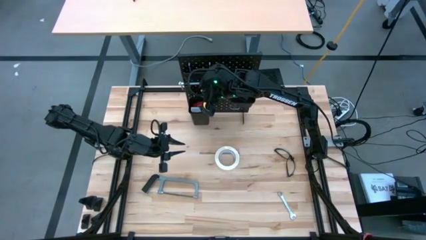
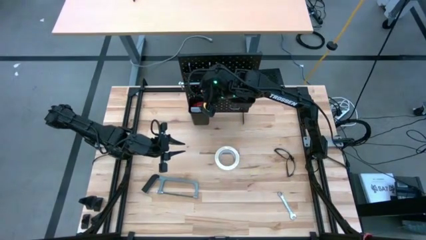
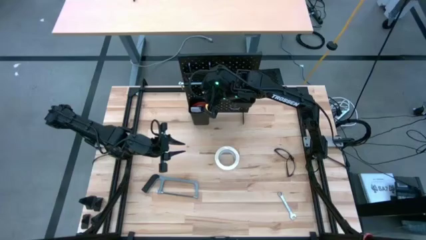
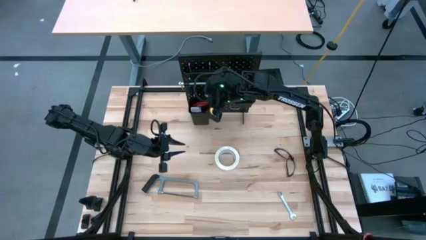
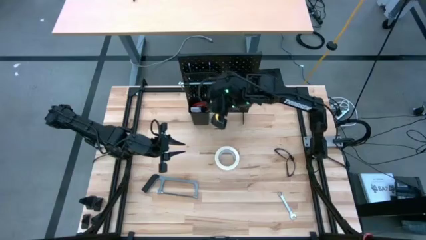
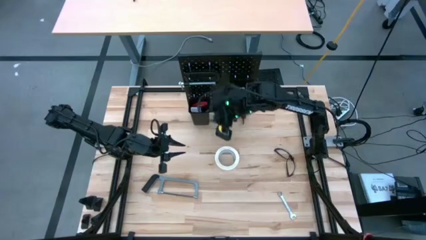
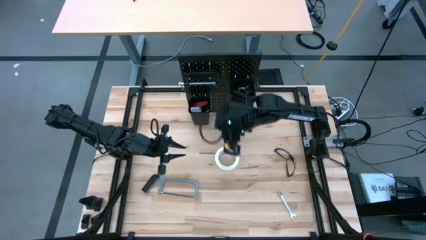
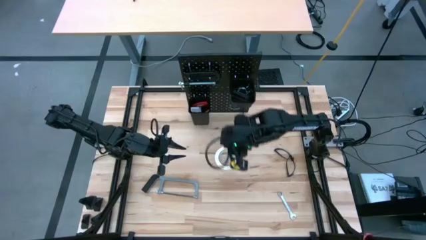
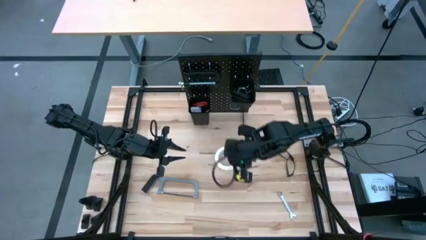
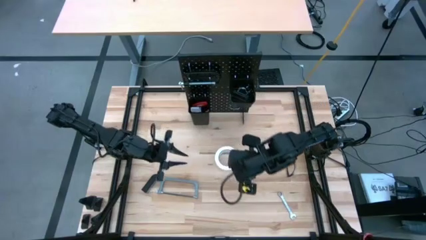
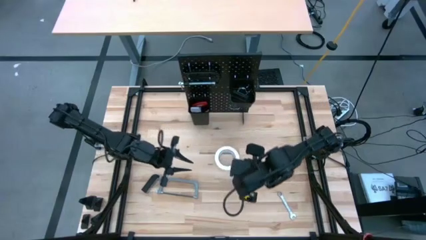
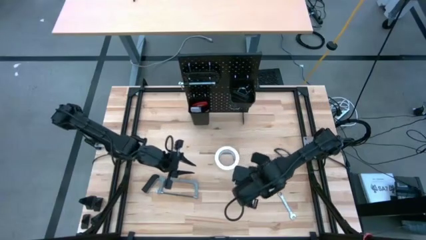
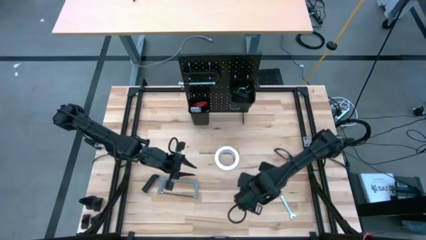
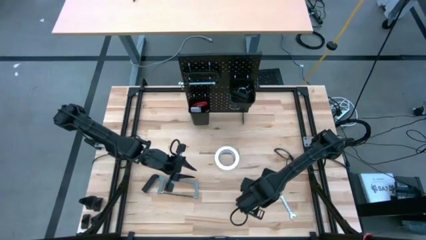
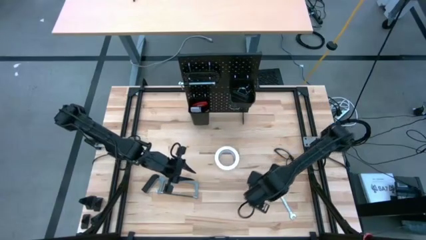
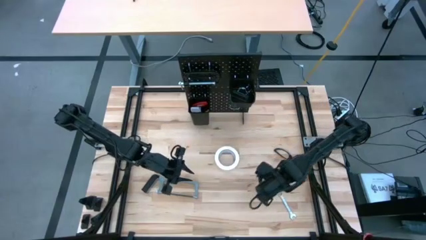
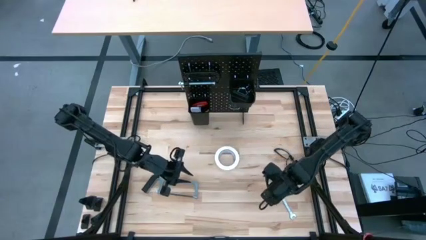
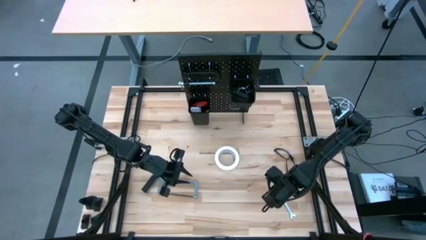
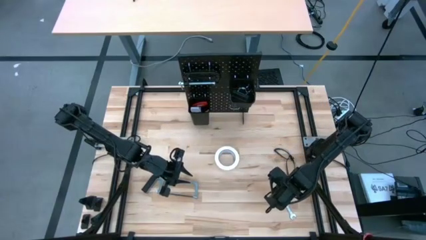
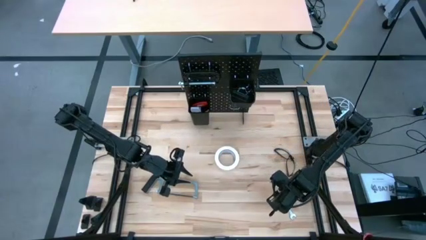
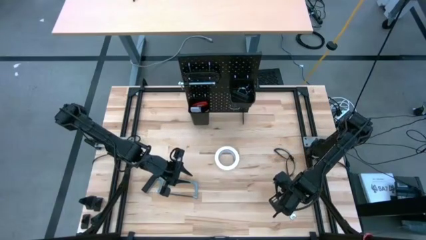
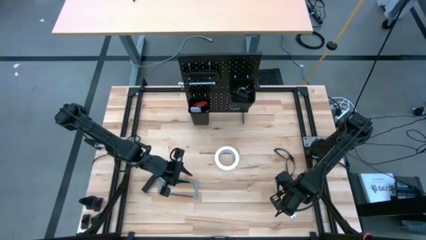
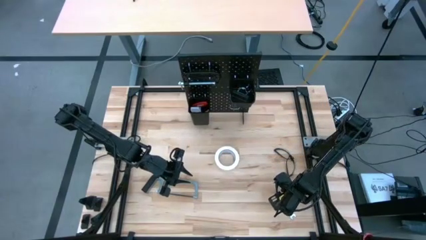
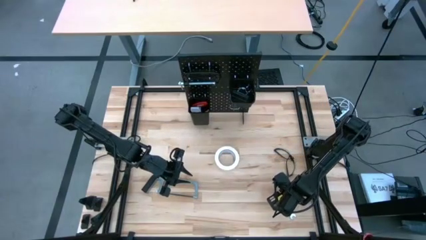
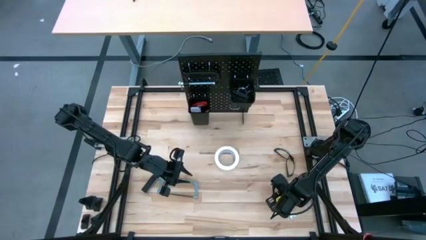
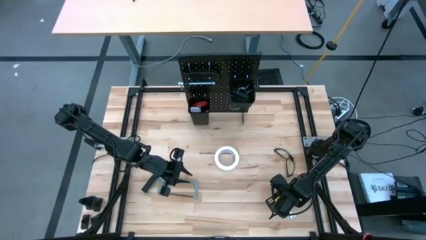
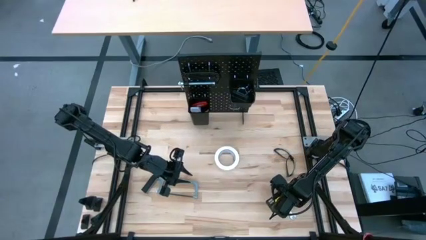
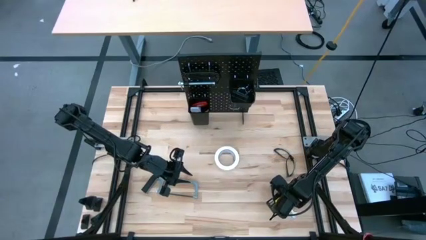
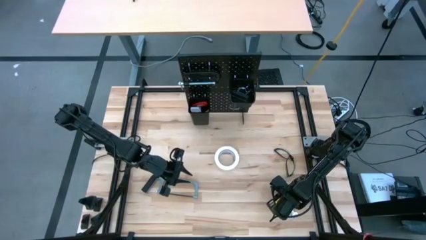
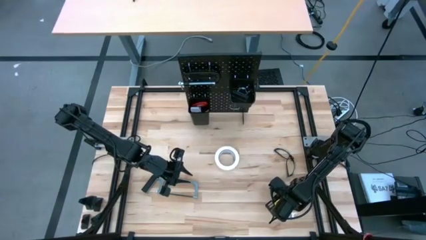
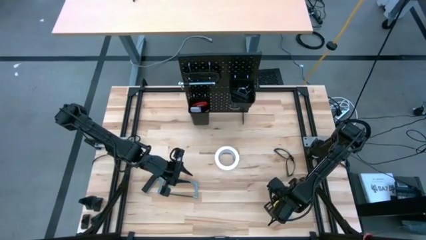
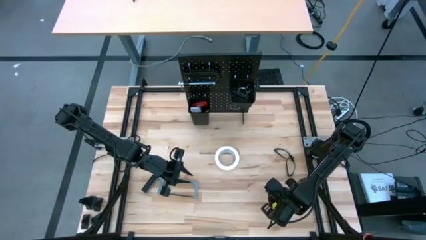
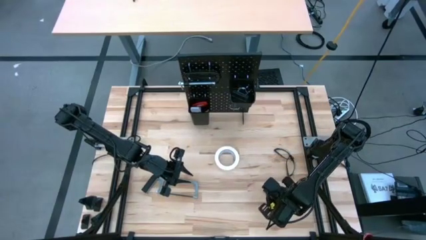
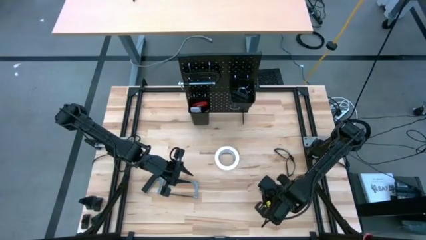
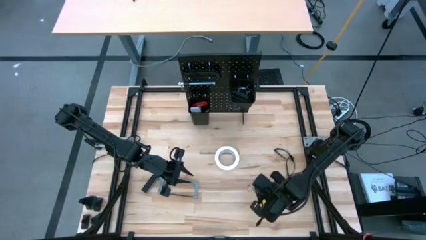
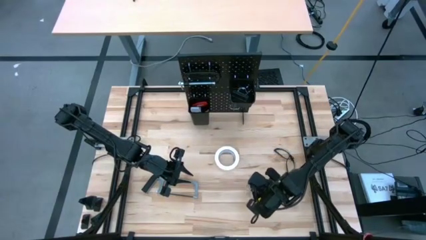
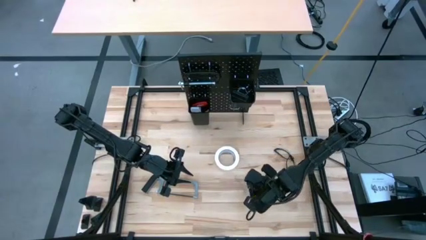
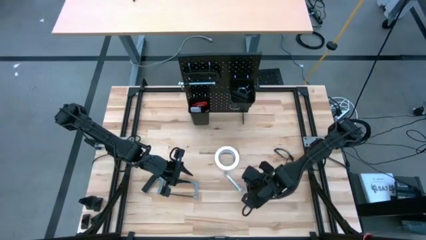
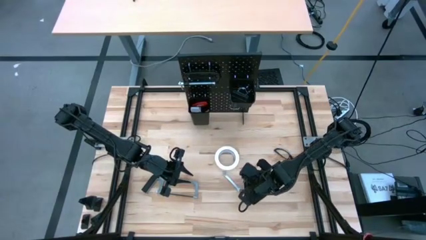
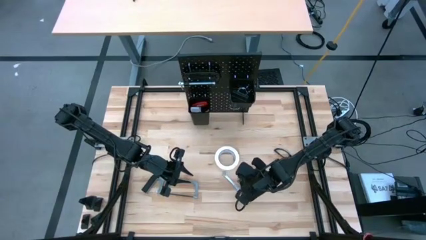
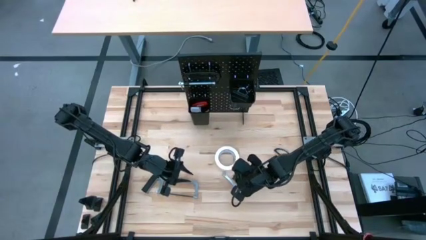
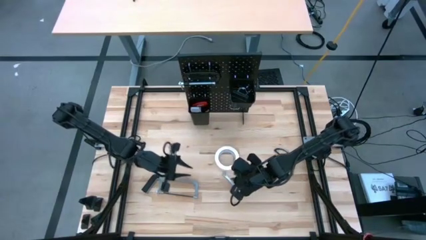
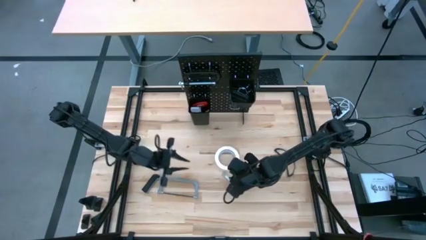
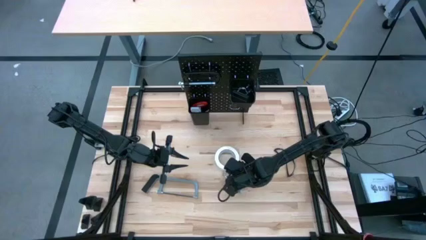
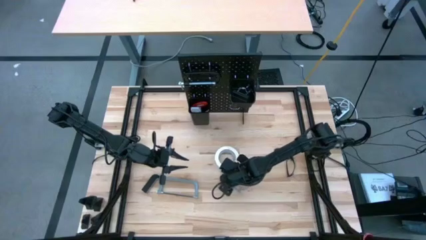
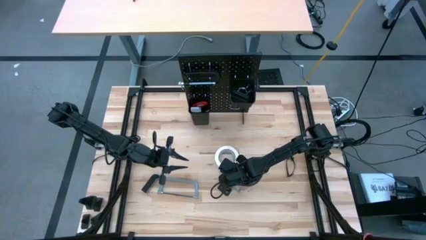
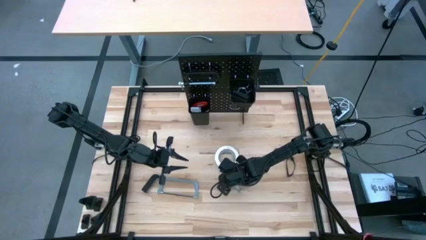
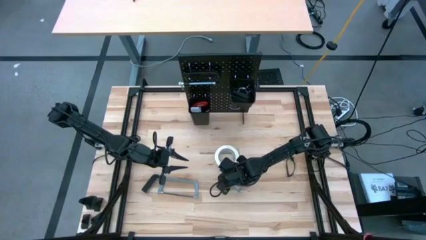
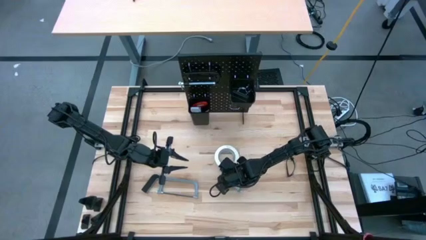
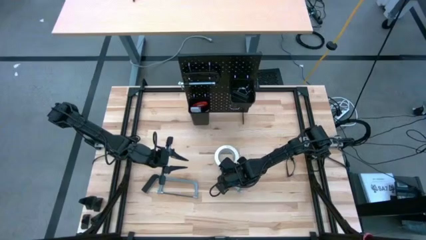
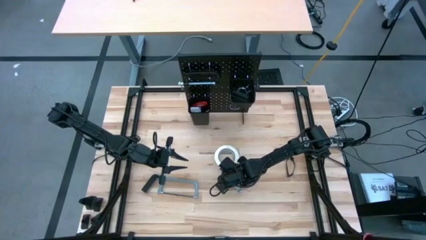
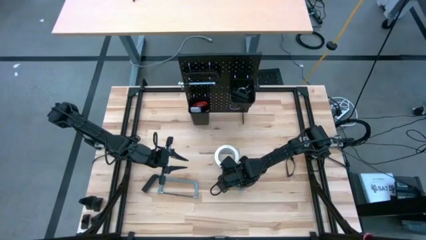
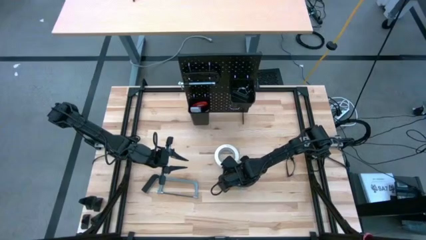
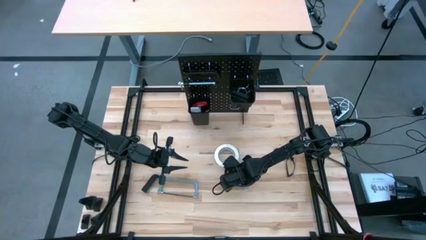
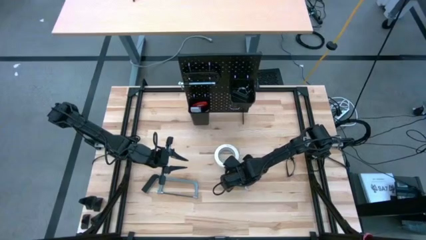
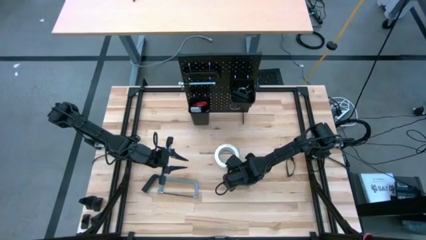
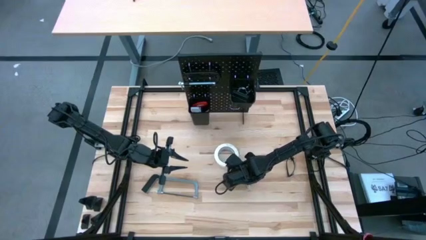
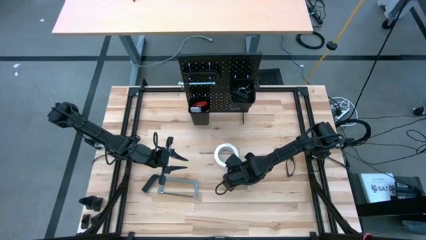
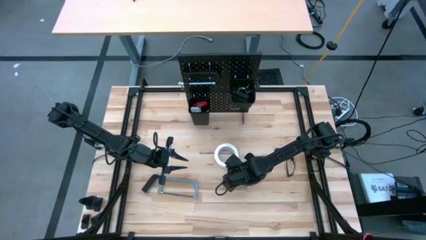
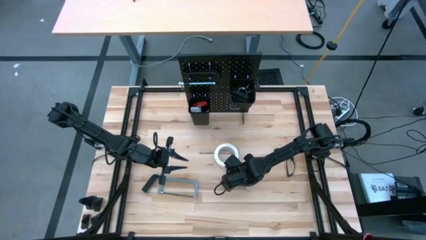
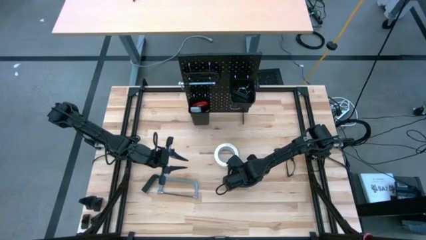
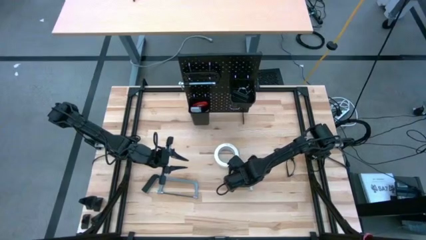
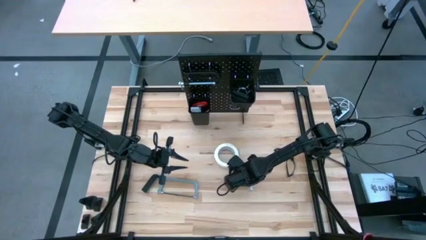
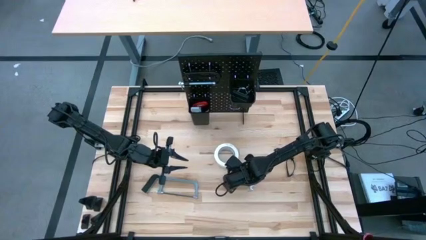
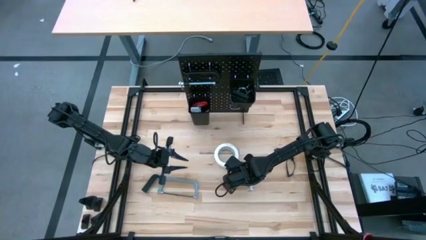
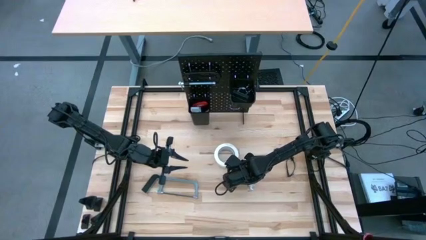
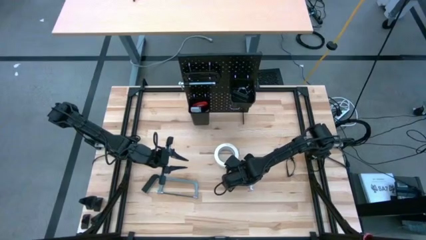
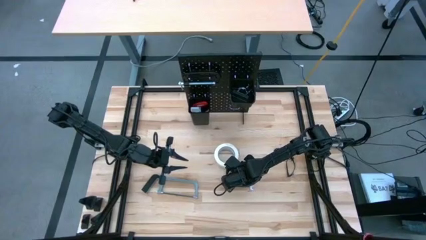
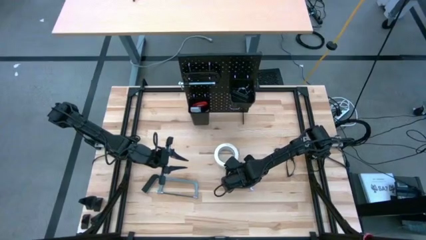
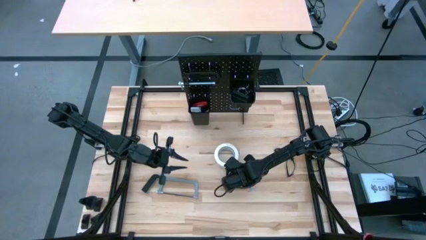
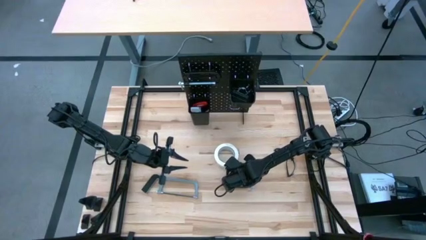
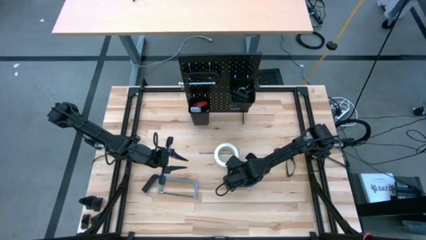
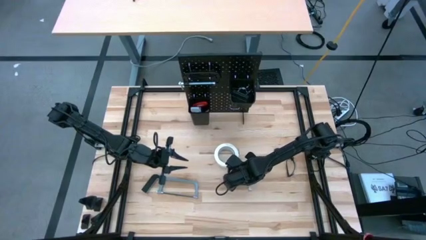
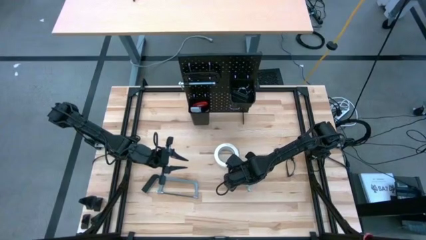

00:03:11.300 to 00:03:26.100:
Task: Hang tools onto peg board
Put the silver wrench into the left black tool bin

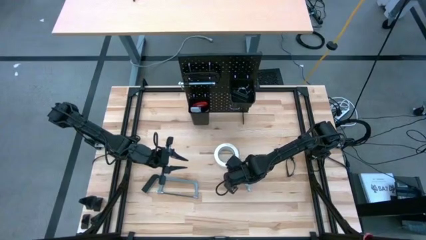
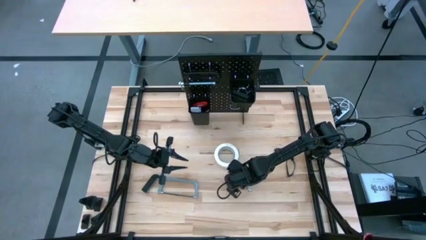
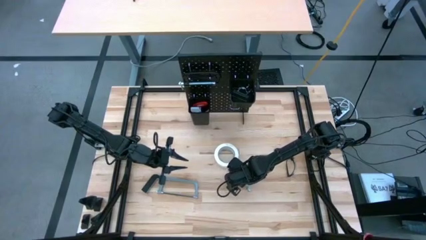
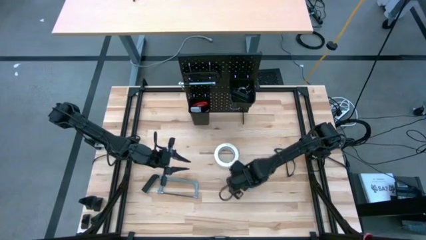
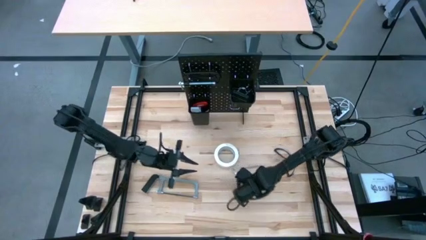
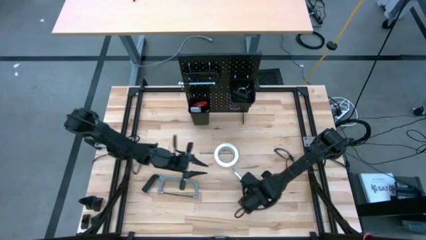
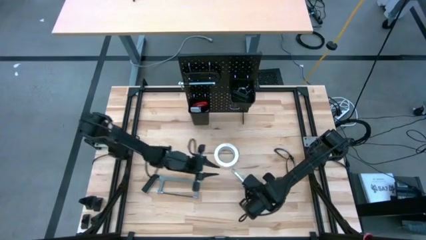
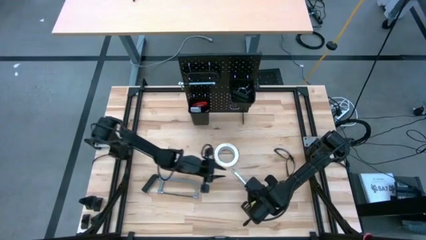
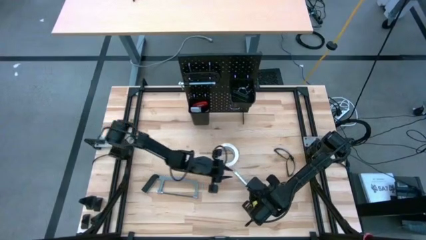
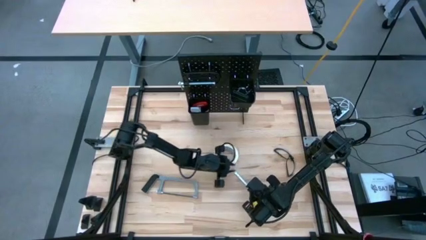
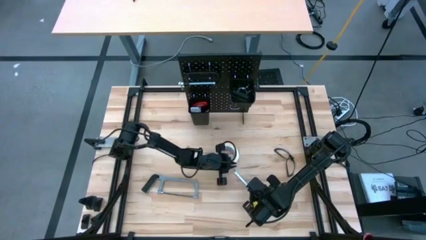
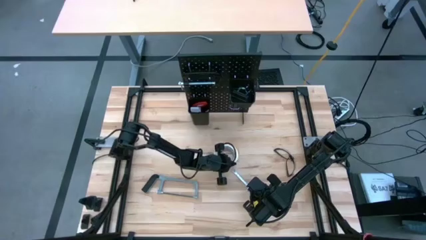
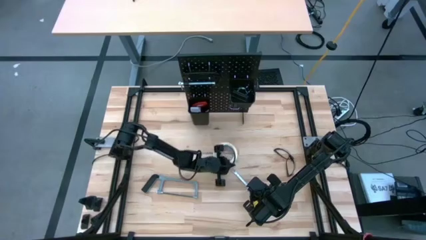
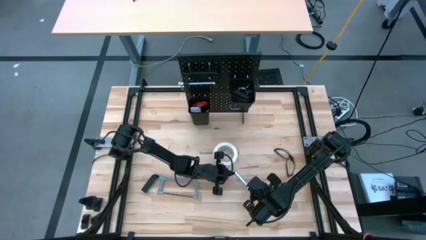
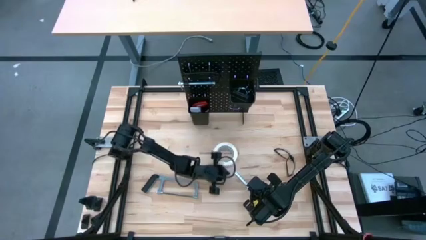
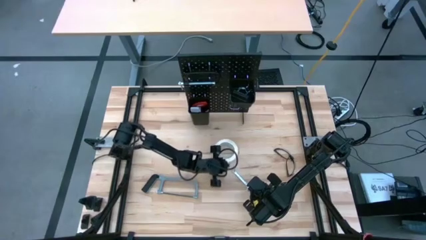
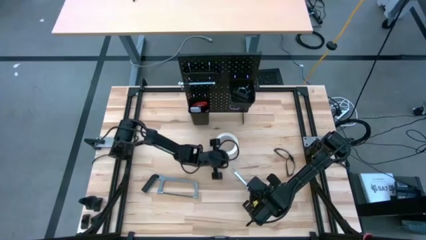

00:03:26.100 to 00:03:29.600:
Adjust the white tape
